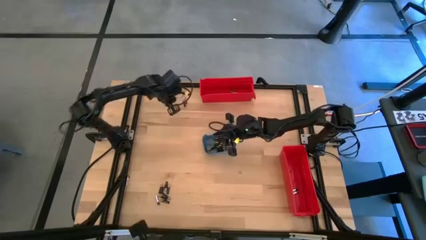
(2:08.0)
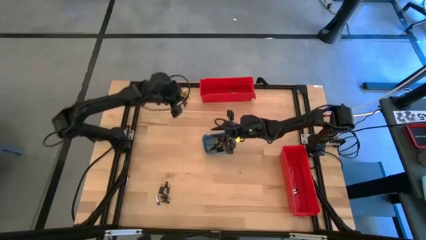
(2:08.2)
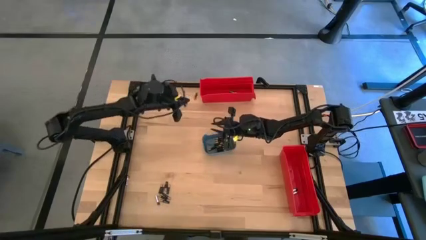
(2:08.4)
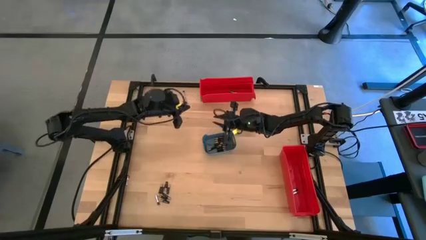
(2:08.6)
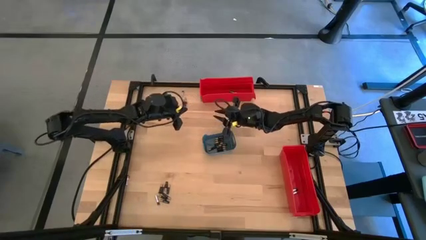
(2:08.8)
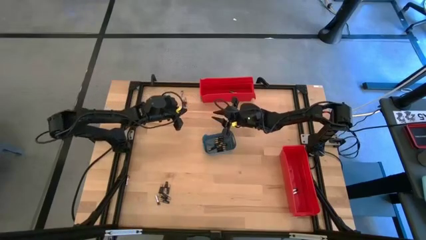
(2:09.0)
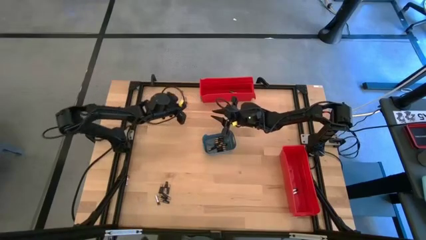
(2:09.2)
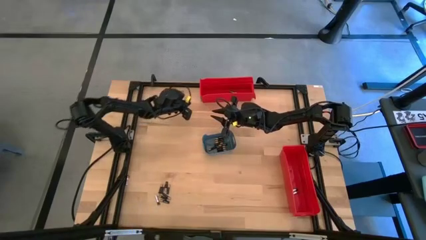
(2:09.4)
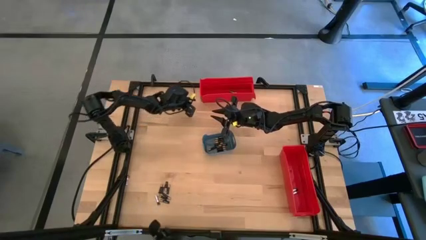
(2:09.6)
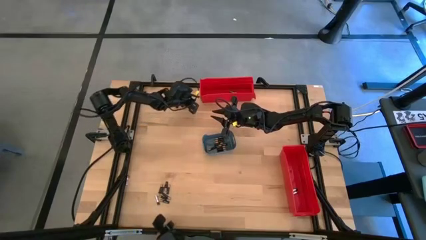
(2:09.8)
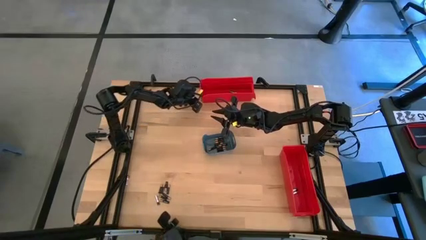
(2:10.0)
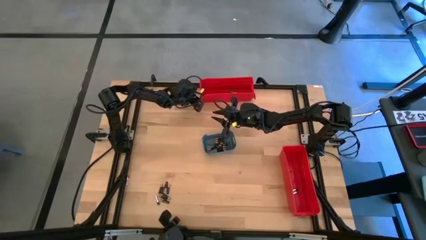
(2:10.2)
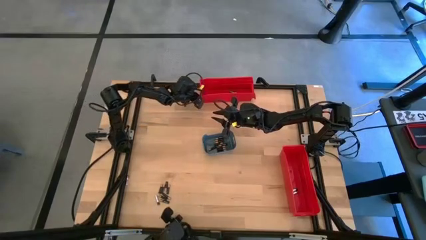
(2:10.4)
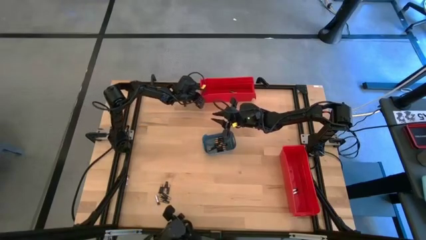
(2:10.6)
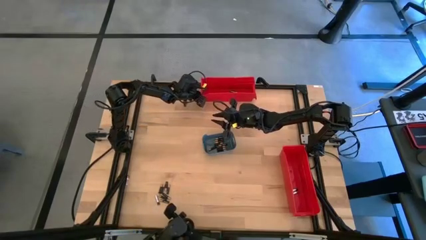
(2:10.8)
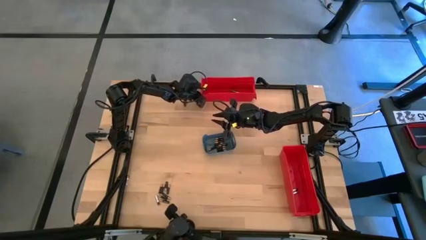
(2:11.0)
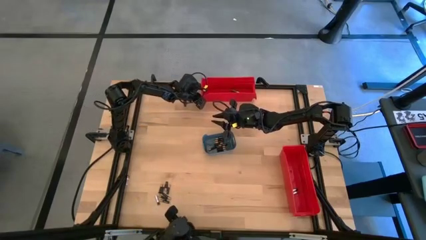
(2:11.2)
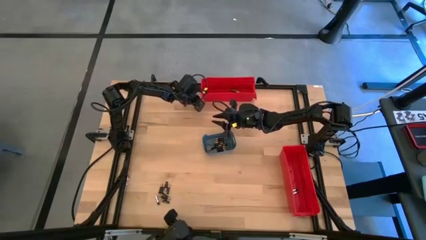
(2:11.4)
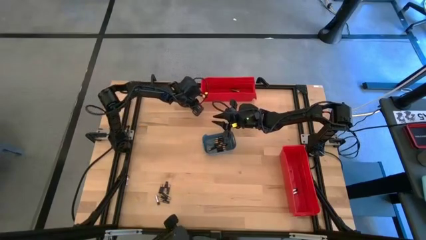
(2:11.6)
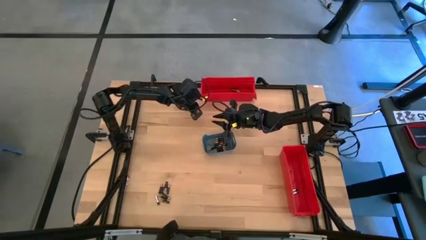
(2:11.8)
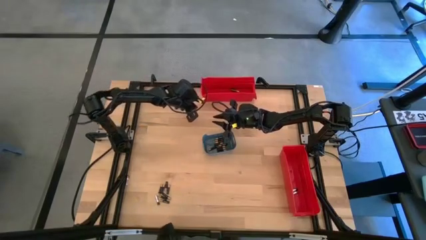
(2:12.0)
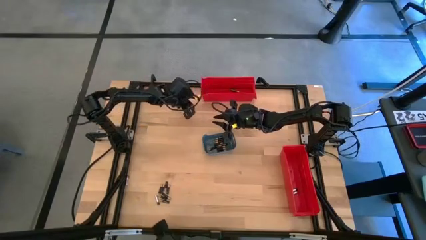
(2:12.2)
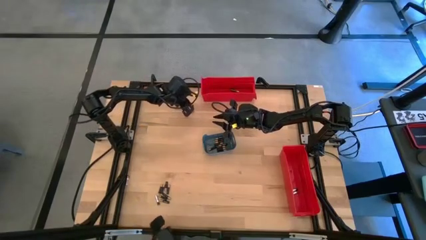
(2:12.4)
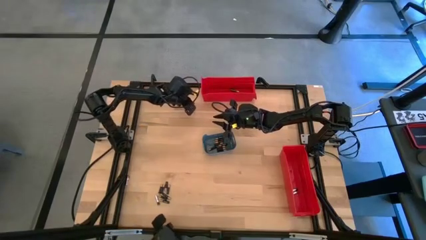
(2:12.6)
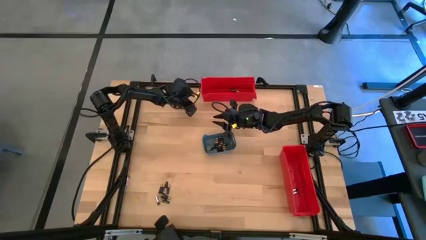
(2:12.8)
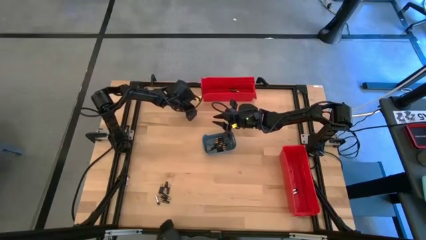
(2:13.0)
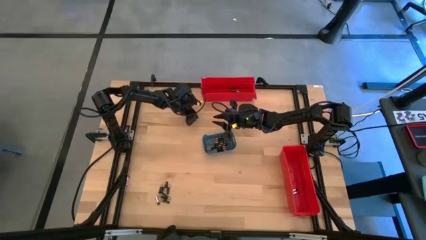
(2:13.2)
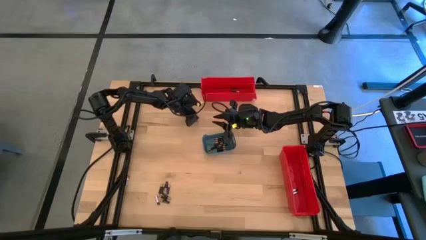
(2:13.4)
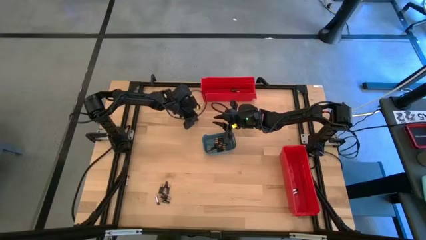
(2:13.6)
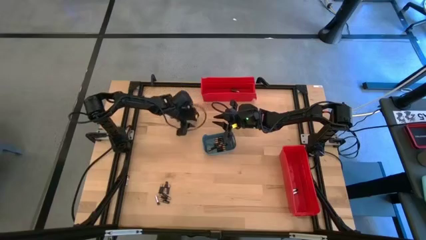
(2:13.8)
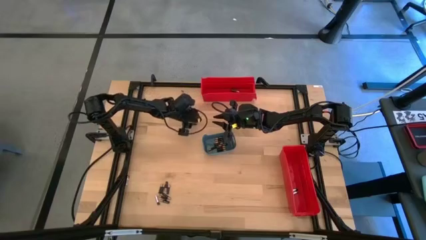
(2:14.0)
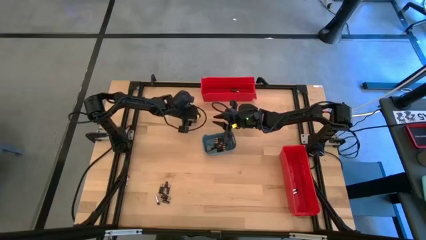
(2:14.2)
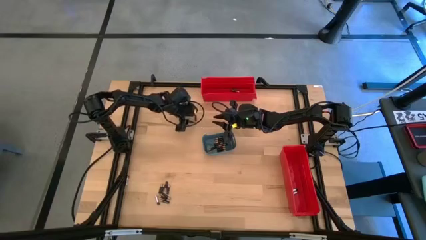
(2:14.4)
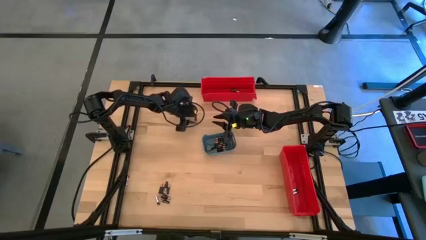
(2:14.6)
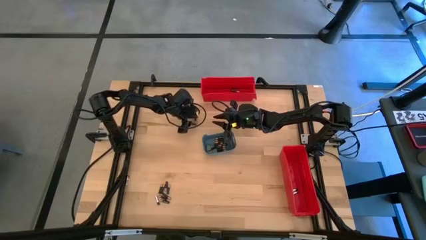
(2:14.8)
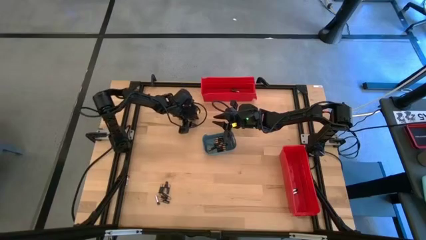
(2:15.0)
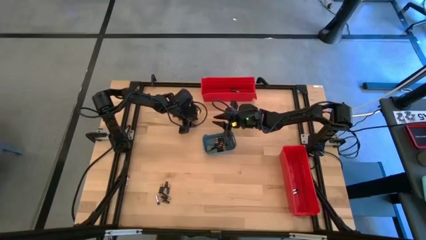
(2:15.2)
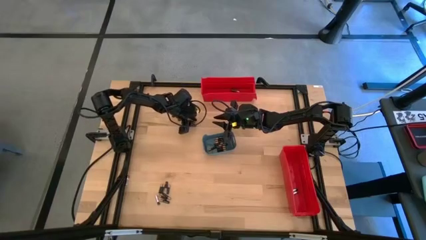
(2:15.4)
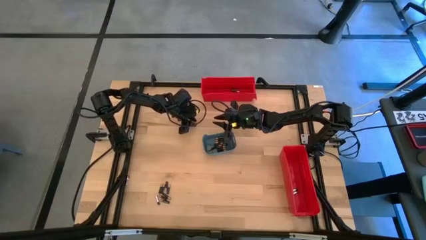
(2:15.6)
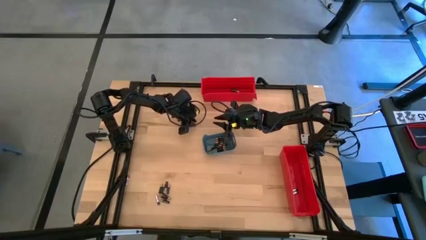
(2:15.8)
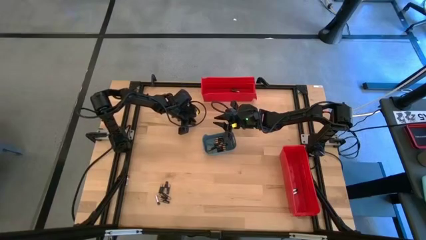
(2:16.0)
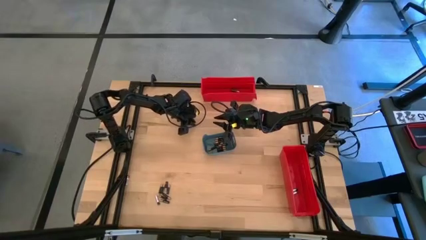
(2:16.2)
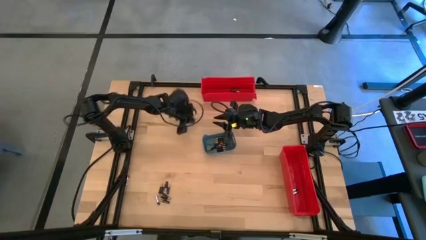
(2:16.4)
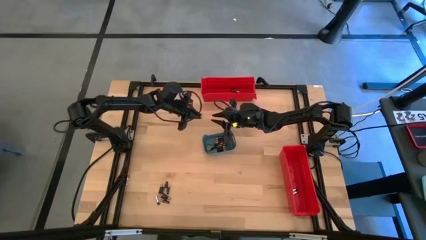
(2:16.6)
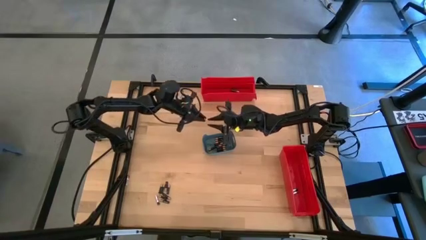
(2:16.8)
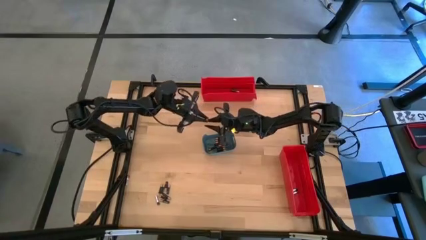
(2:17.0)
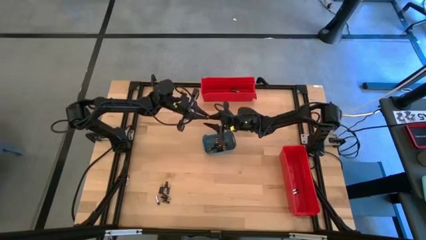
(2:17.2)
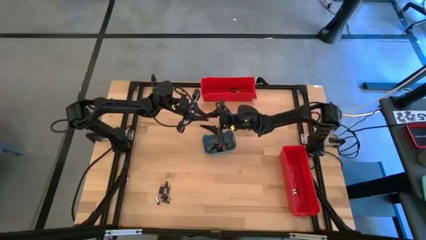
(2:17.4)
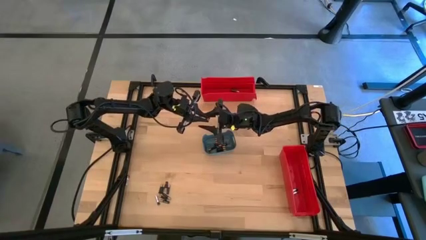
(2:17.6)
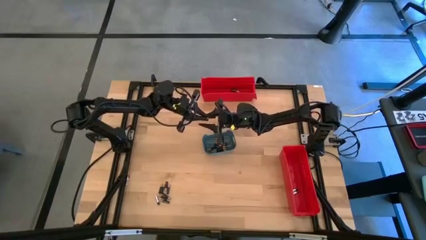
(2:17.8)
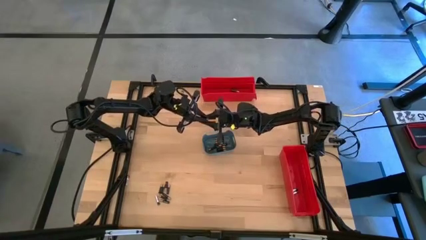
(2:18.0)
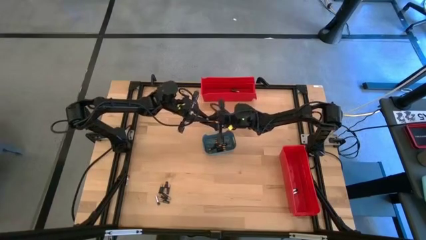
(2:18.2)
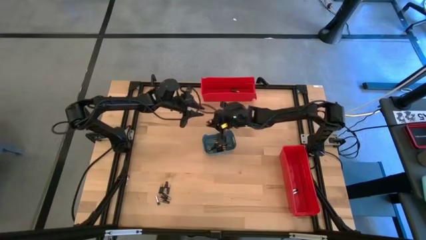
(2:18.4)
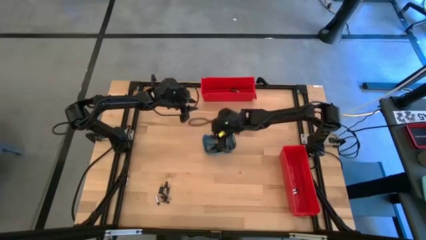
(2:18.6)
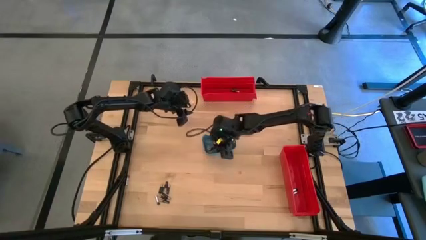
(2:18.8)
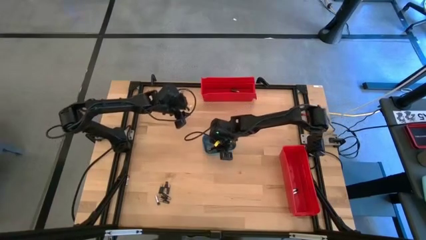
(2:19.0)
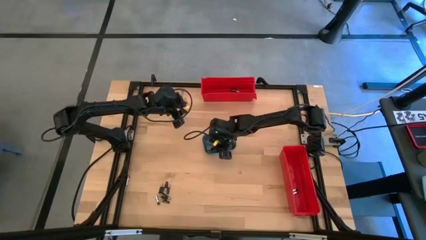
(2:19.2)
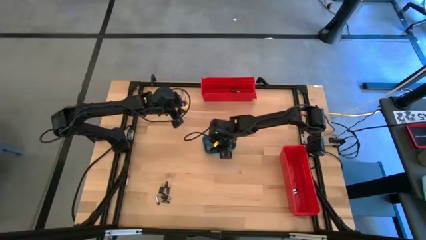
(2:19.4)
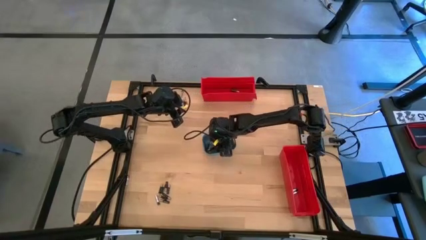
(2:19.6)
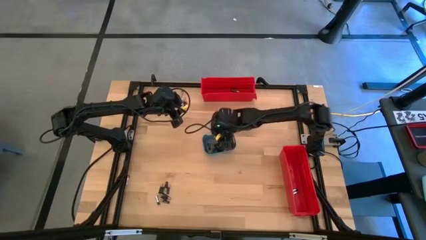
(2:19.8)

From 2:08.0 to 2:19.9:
Task: Sort batteries
Put the black battery into the blue bin
